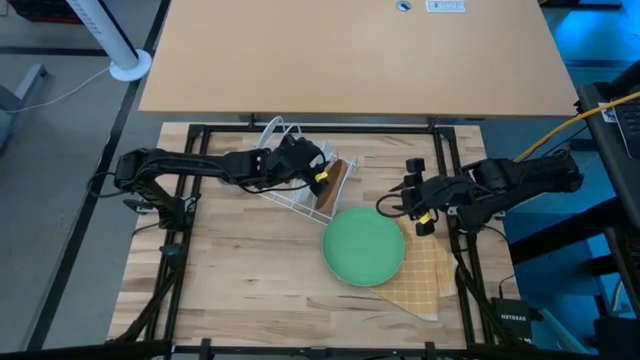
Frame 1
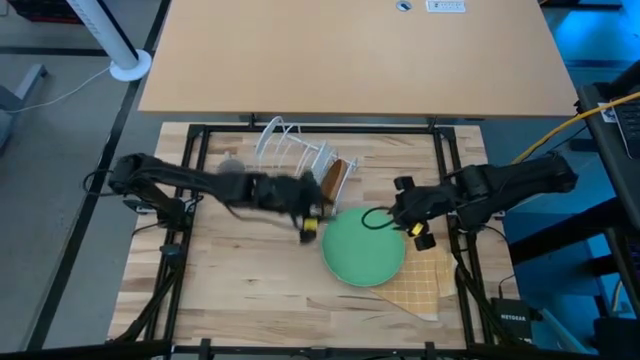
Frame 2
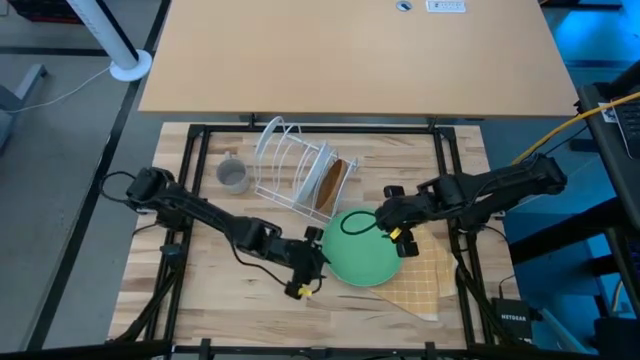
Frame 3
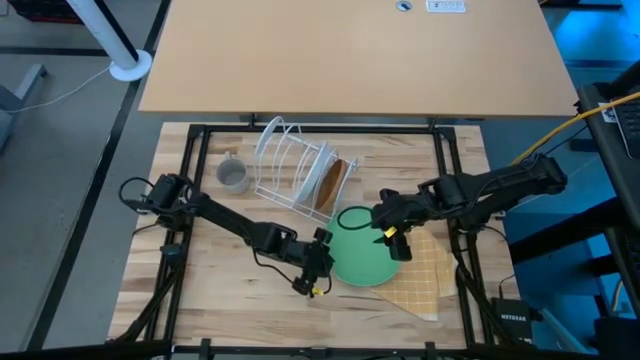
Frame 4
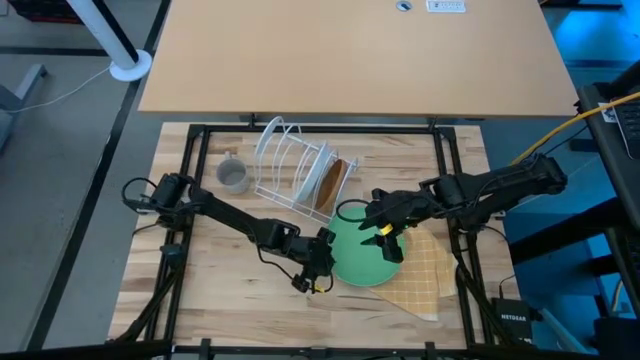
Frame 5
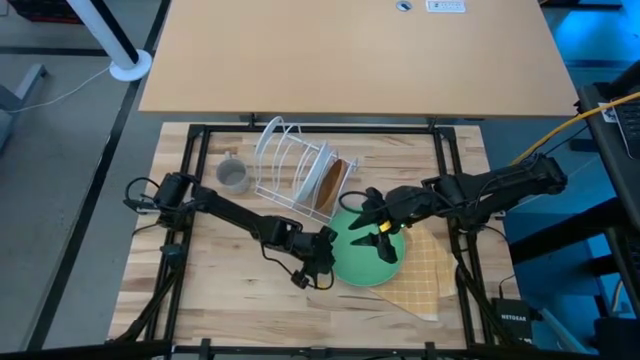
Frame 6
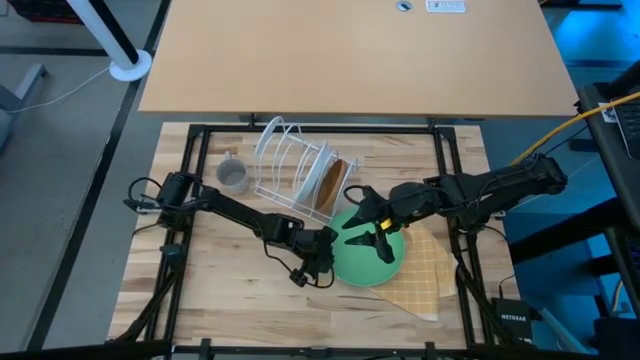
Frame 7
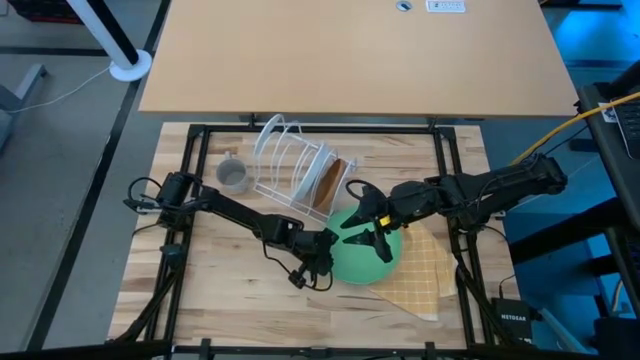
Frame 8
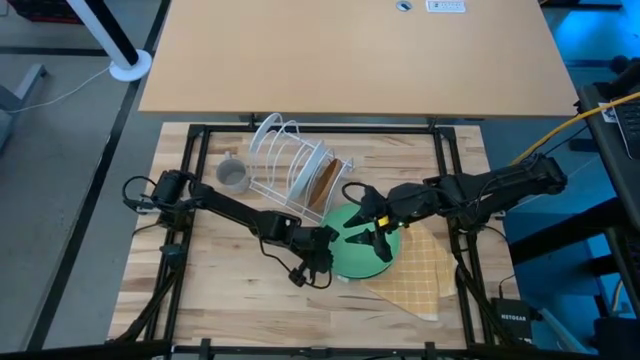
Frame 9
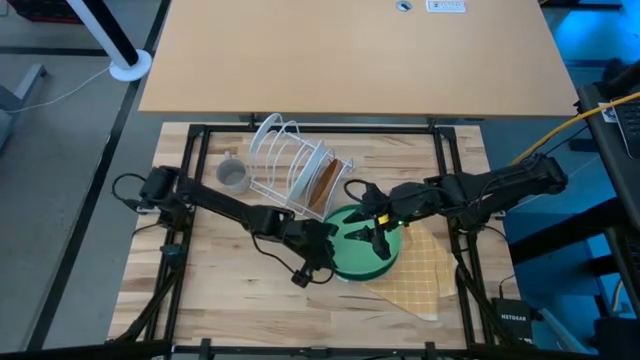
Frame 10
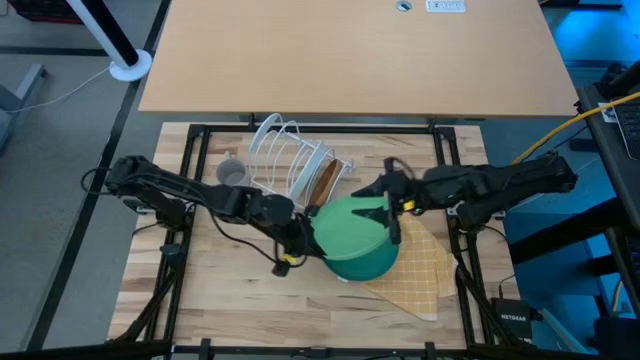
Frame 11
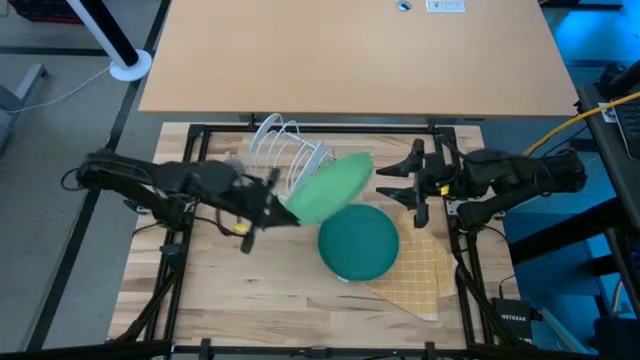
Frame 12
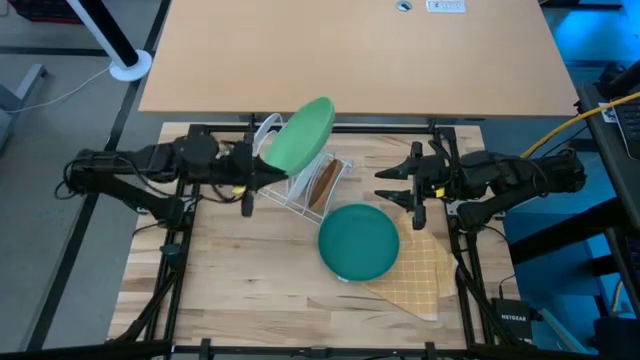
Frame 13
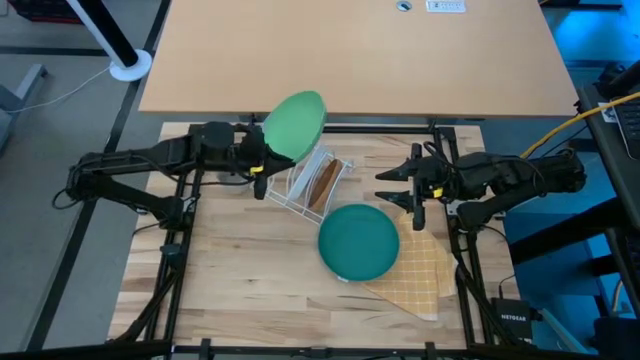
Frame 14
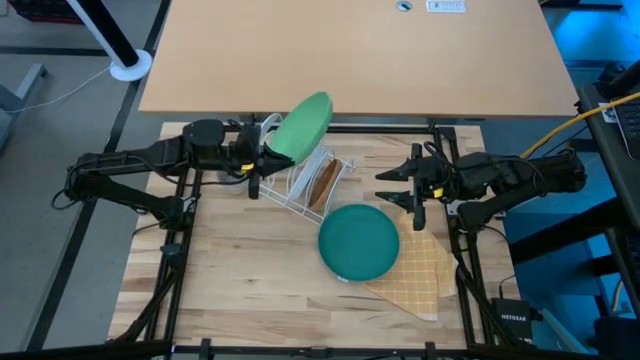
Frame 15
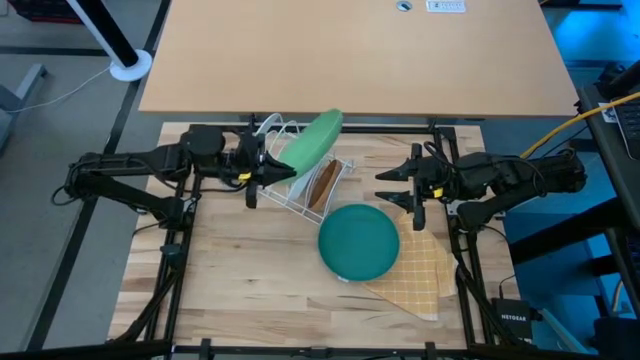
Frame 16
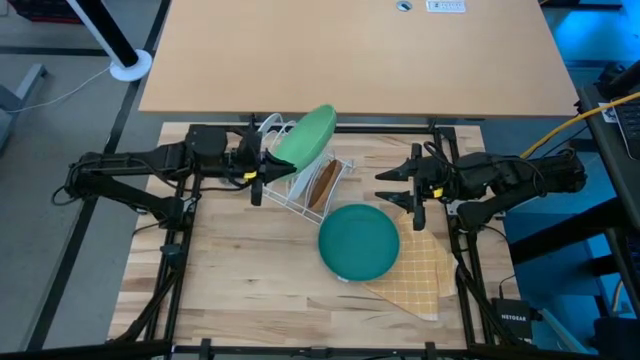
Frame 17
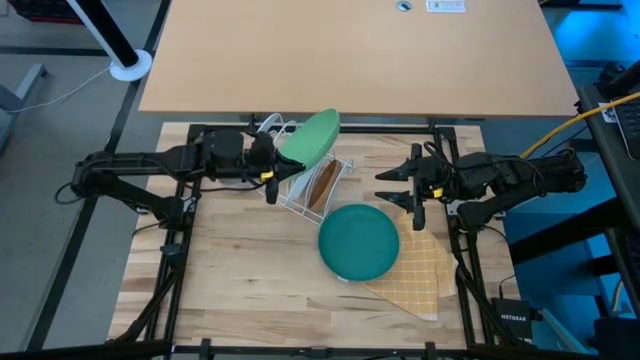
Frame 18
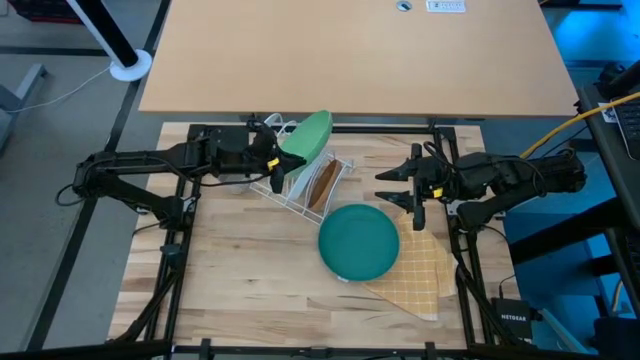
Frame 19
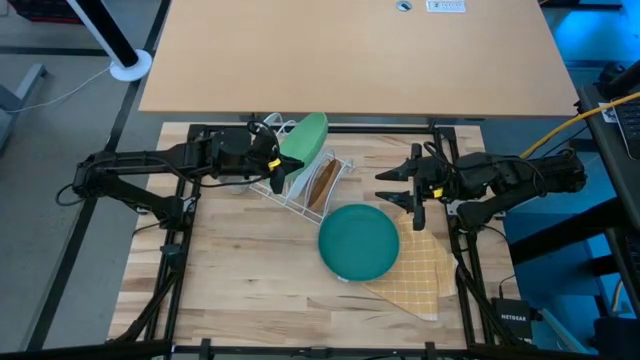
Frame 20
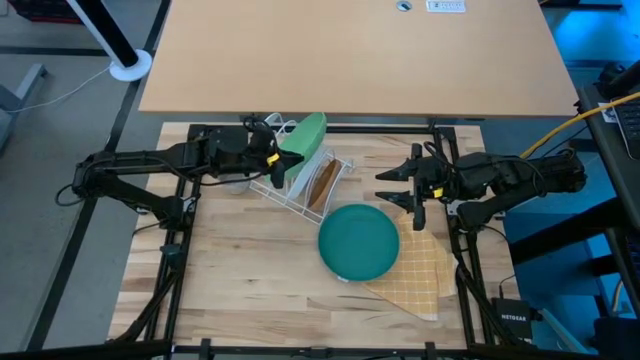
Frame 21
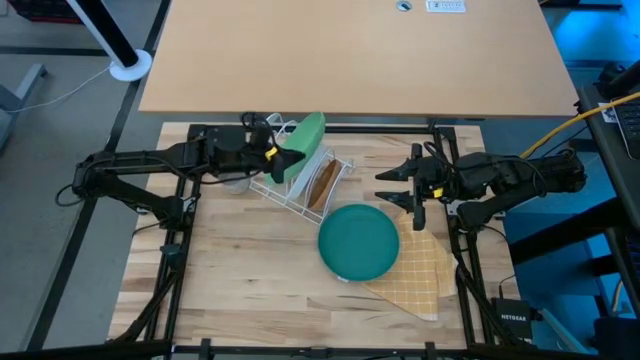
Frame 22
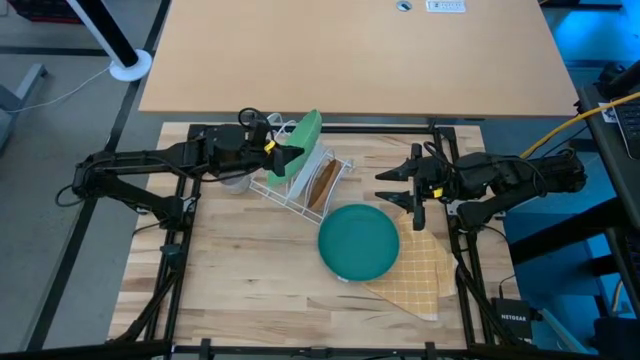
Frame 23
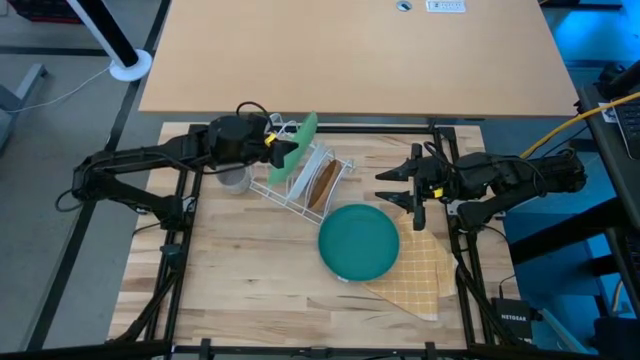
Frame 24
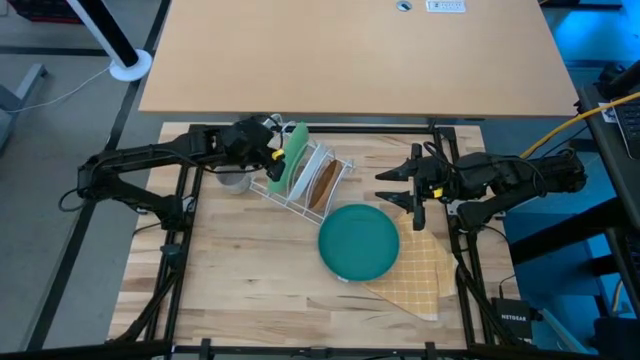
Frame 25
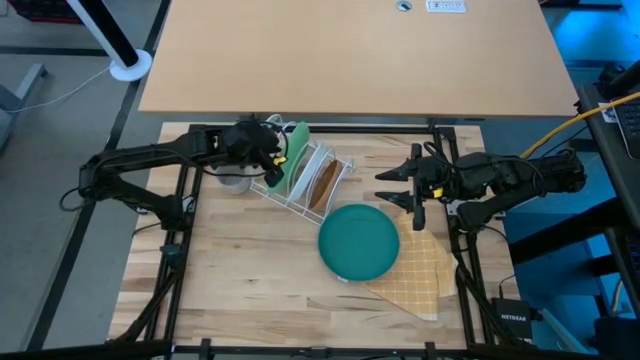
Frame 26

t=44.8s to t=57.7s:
Task: Sort dishes
Put the green plate from the top of the dark green onto the white dish rack

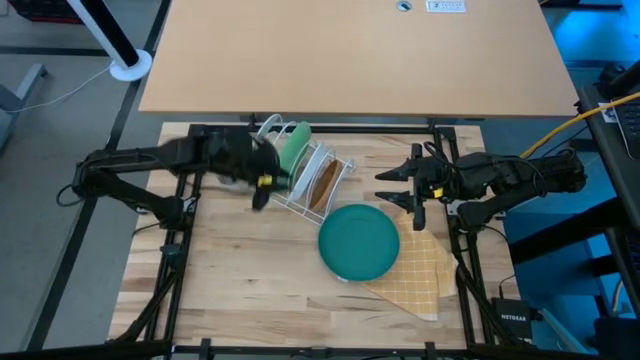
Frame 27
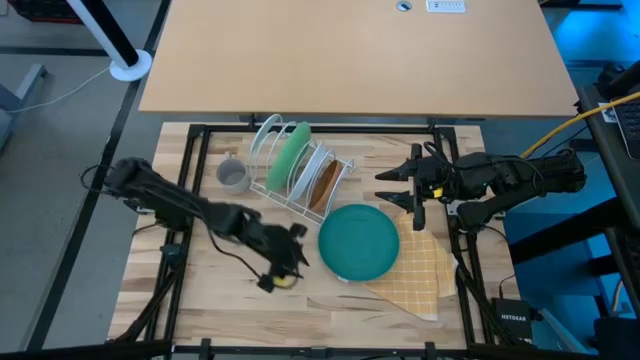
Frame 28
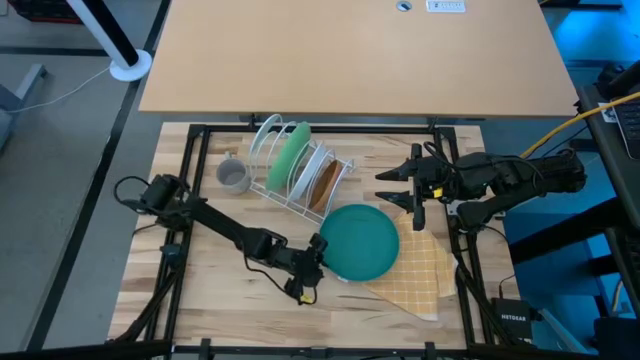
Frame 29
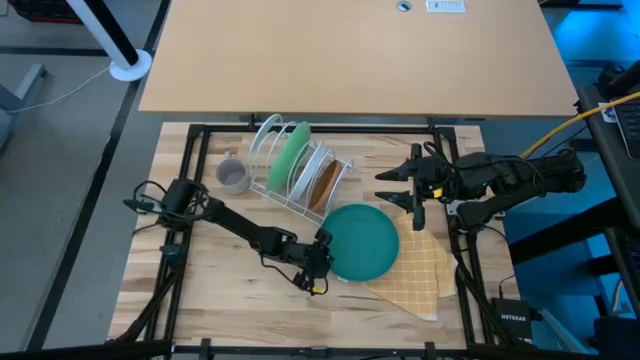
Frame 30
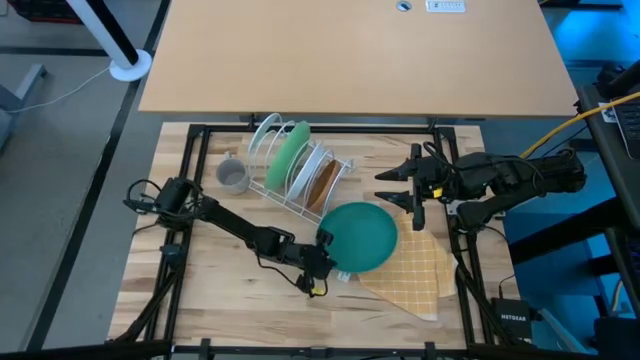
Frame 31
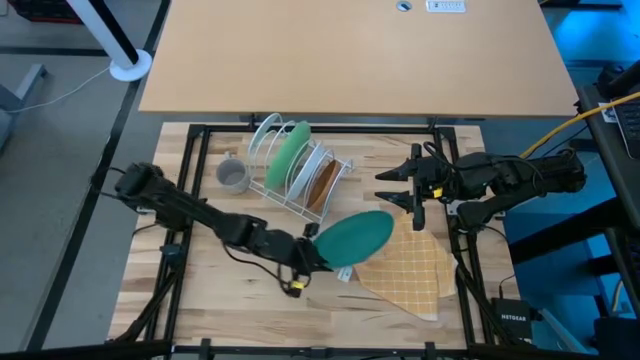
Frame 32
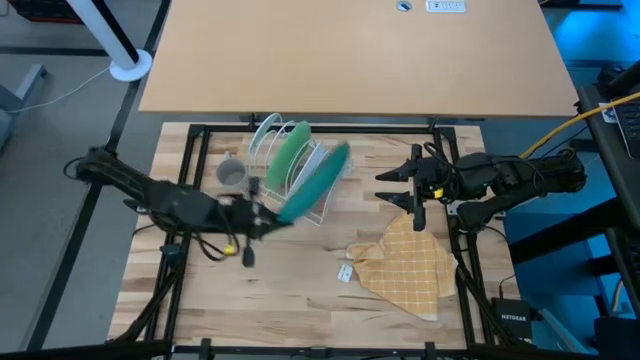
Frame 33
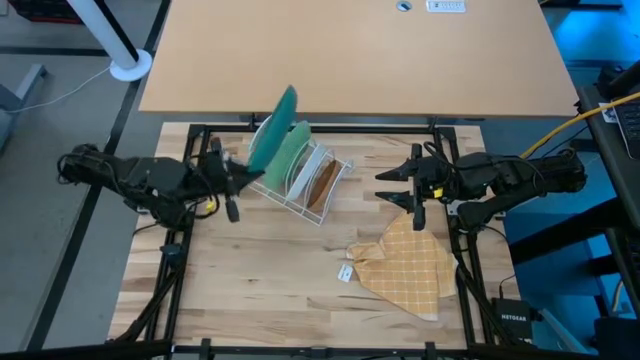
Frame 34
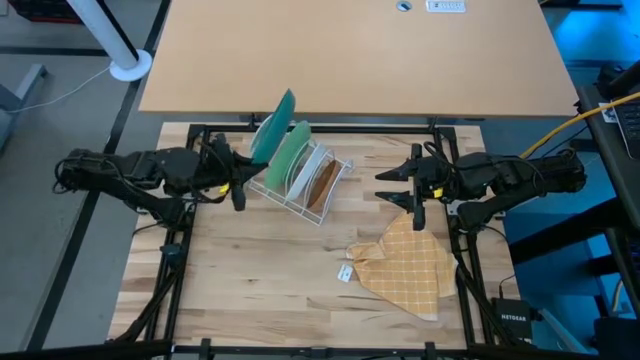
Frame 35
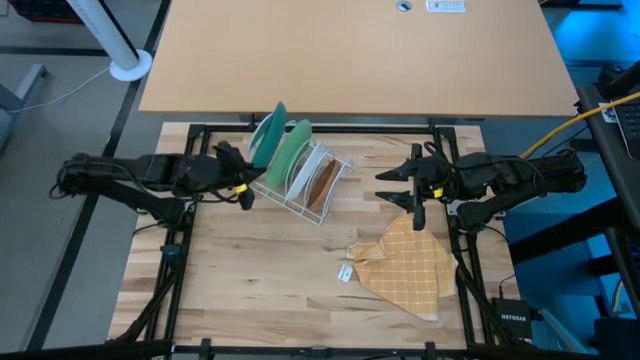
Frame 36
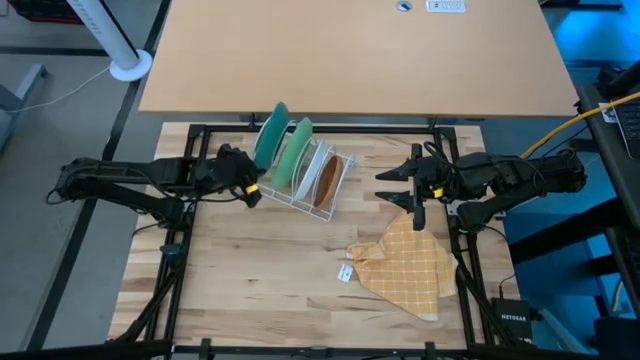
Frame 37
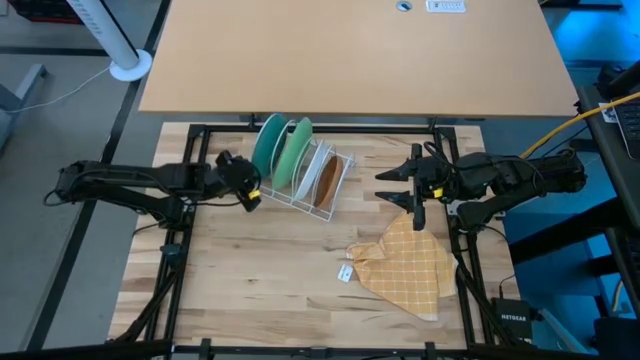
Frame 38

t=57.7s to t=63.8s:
Put the dark green plate onto the top white dish rack

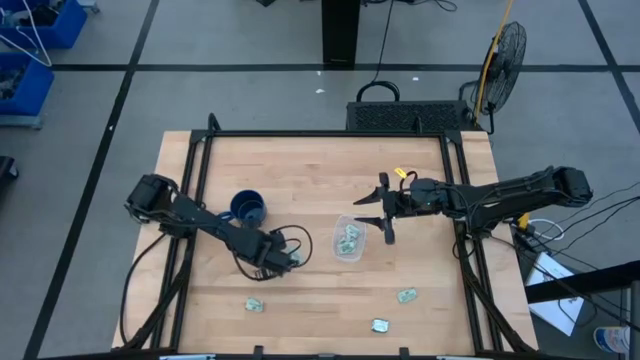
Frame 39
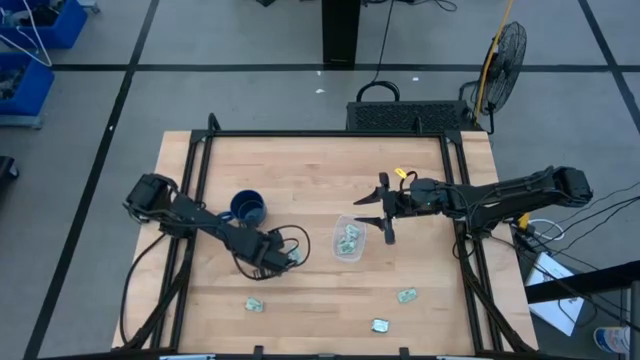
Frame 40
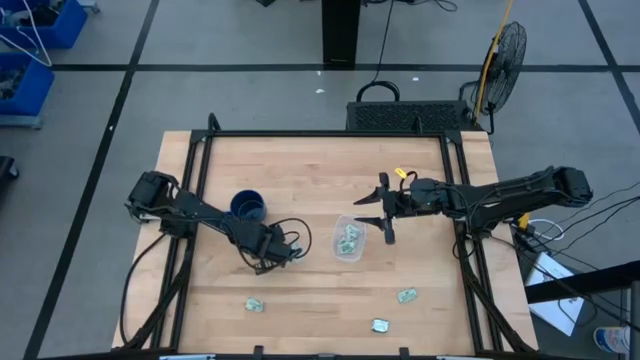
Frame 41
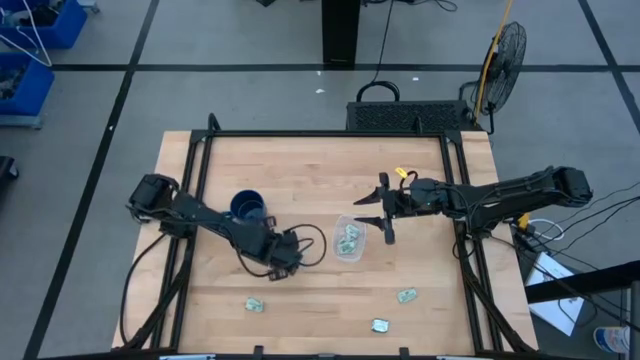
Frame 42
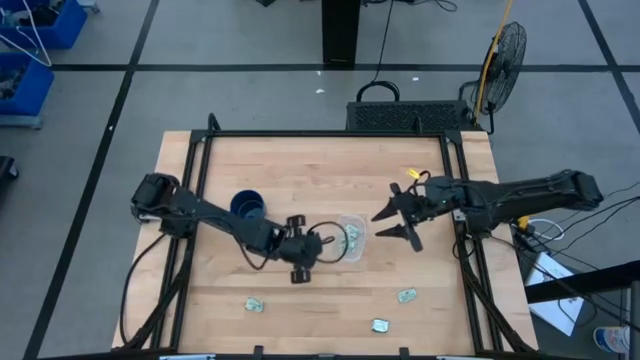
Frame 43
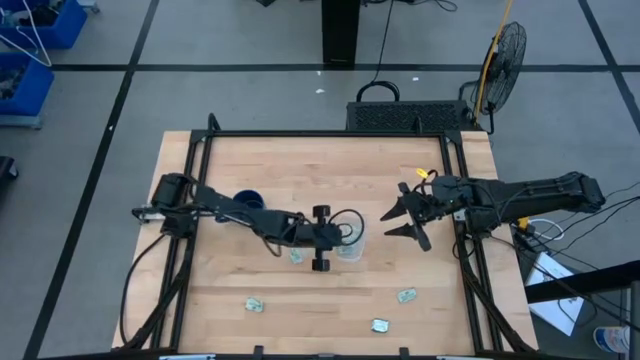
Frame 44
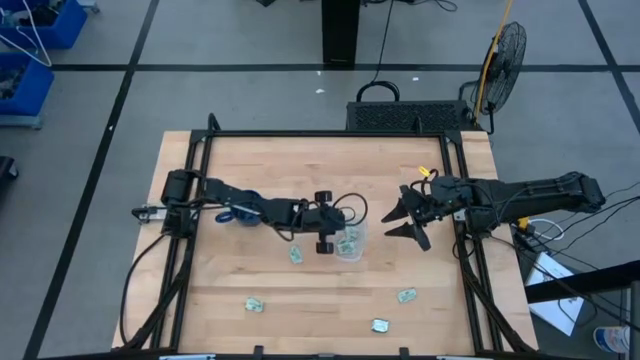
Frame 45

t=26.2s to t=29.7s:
Task: Pick and place Stevia / Truvia into bins
Put the stevia packet into the transparent container
